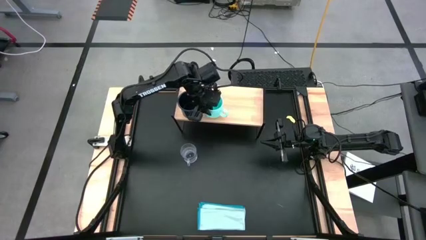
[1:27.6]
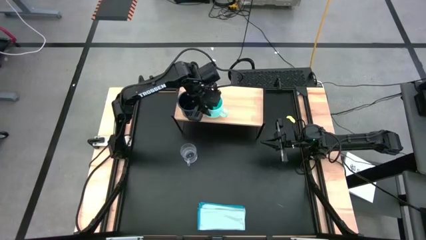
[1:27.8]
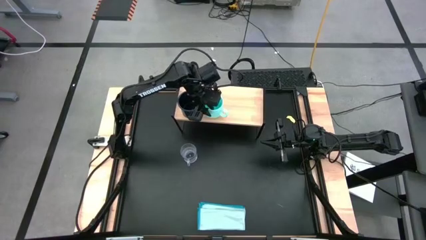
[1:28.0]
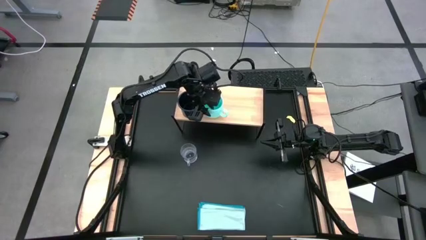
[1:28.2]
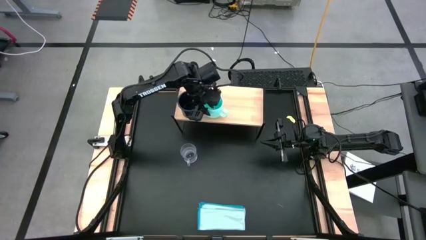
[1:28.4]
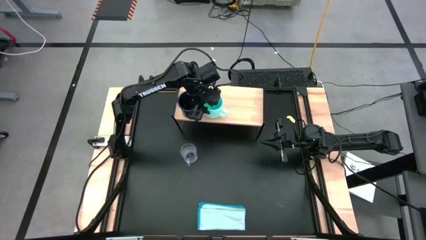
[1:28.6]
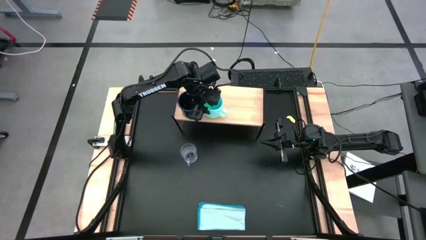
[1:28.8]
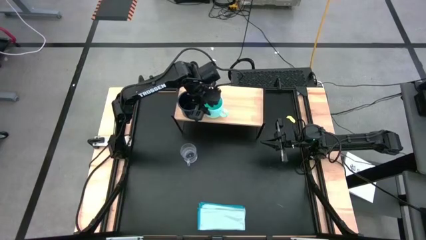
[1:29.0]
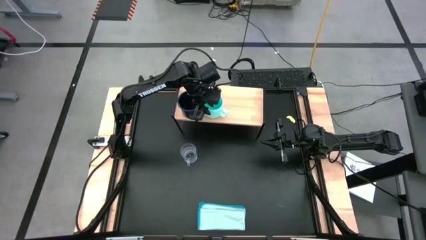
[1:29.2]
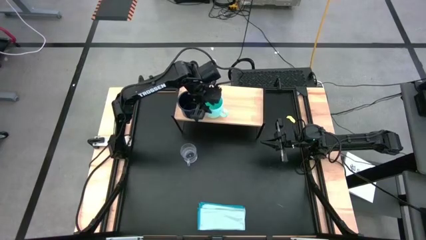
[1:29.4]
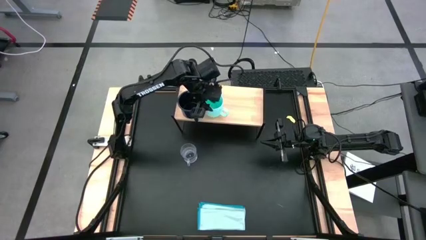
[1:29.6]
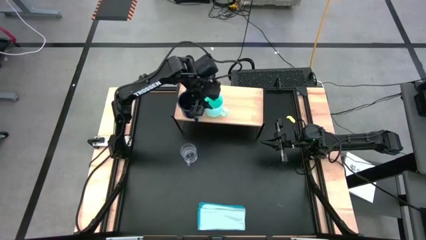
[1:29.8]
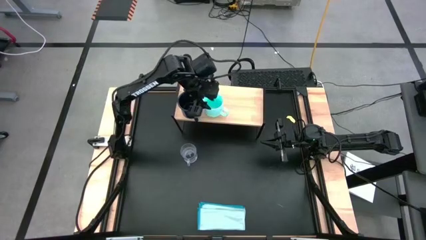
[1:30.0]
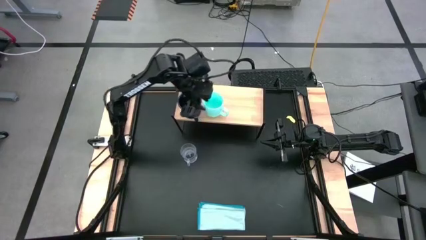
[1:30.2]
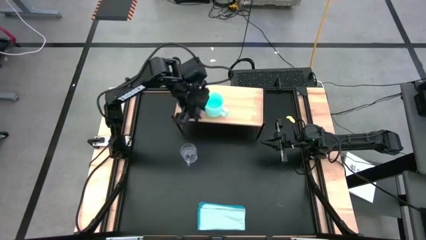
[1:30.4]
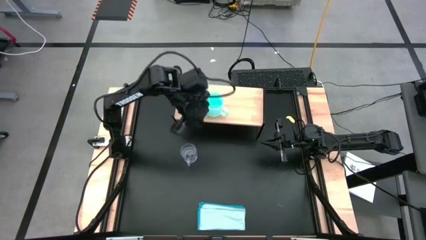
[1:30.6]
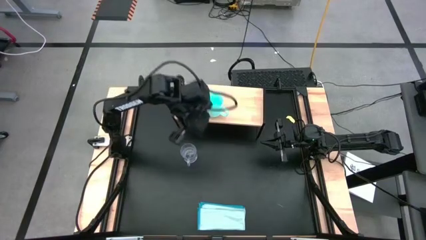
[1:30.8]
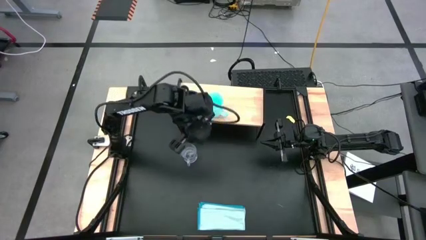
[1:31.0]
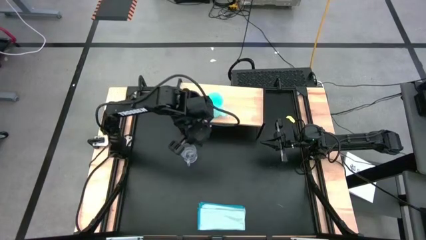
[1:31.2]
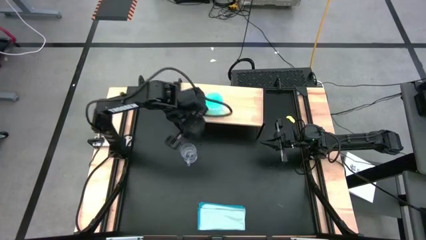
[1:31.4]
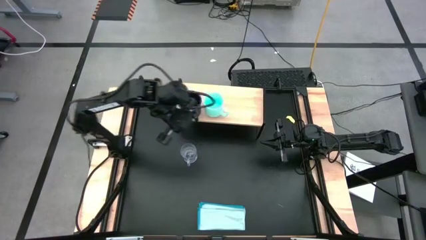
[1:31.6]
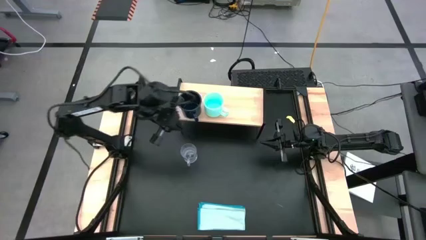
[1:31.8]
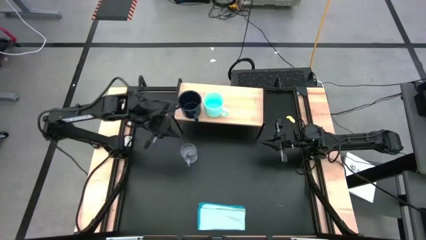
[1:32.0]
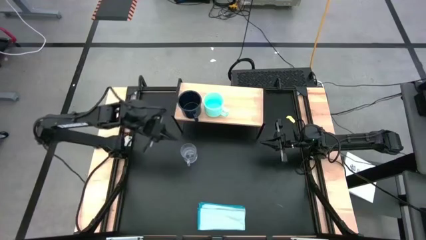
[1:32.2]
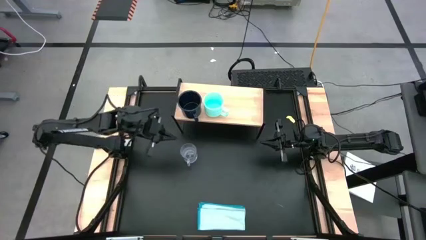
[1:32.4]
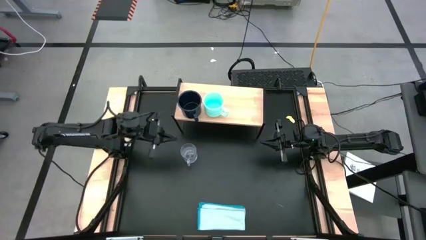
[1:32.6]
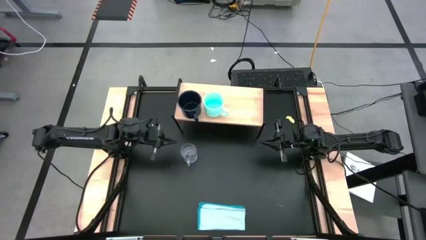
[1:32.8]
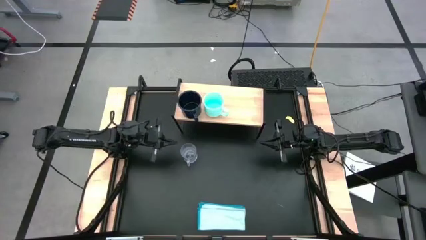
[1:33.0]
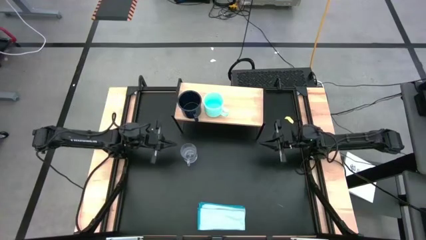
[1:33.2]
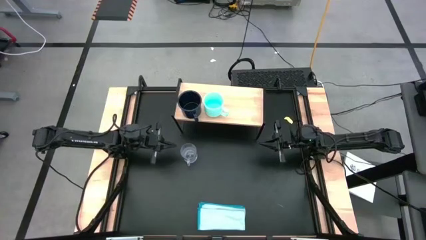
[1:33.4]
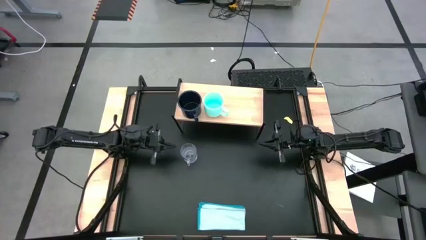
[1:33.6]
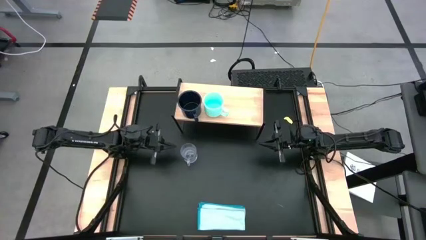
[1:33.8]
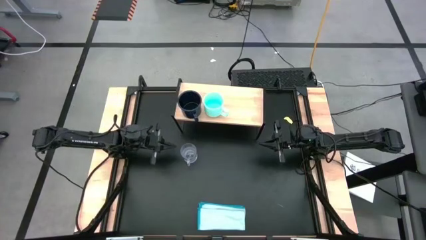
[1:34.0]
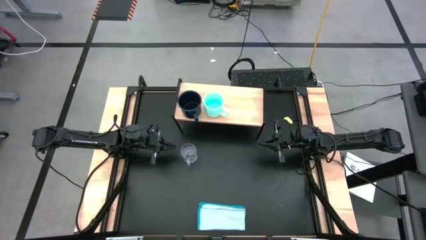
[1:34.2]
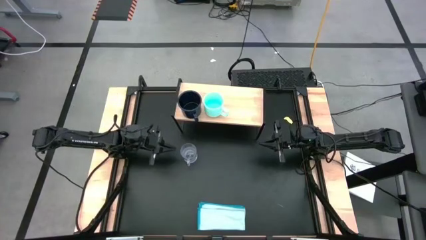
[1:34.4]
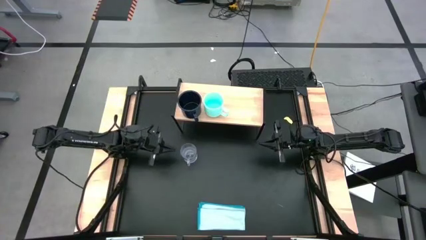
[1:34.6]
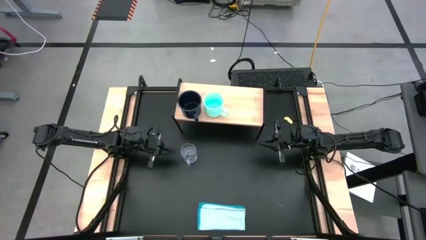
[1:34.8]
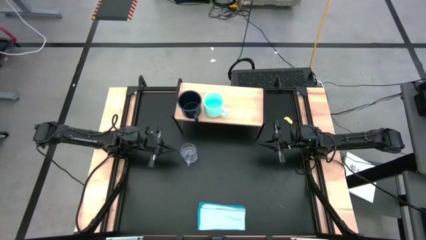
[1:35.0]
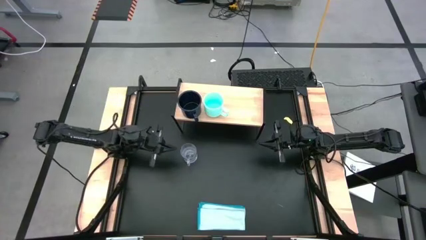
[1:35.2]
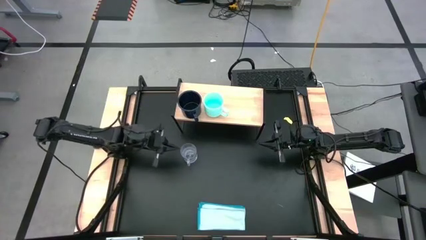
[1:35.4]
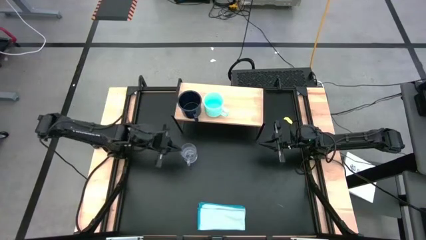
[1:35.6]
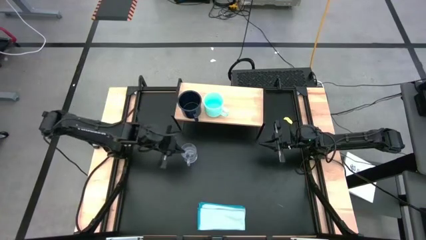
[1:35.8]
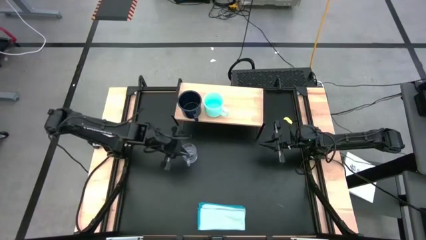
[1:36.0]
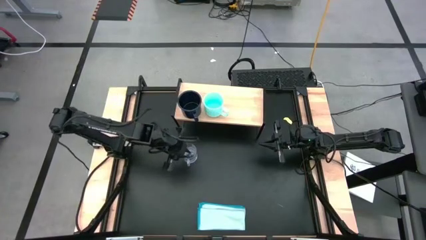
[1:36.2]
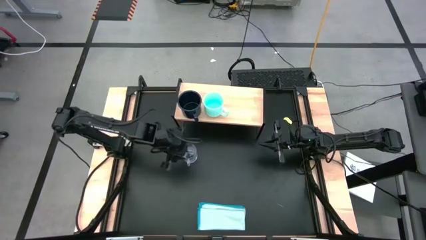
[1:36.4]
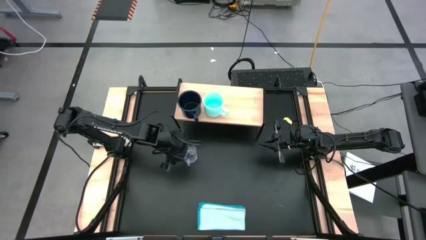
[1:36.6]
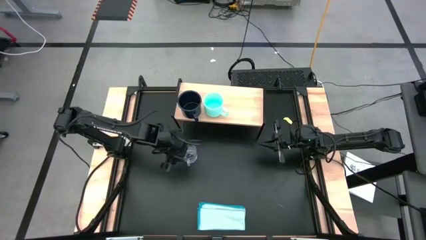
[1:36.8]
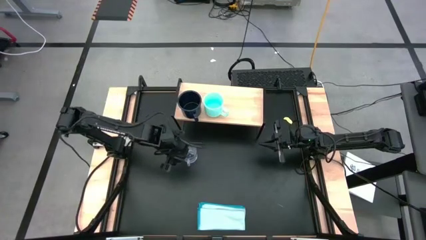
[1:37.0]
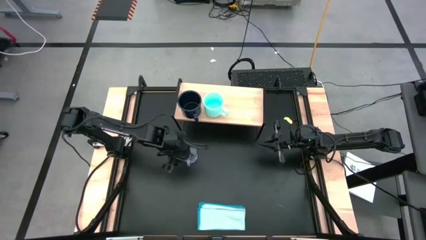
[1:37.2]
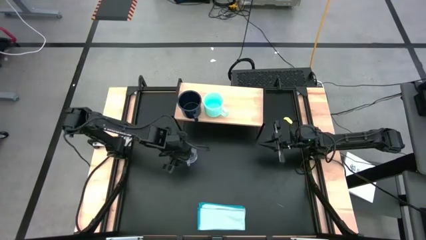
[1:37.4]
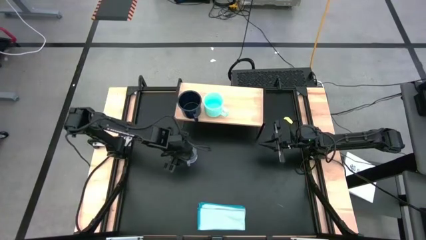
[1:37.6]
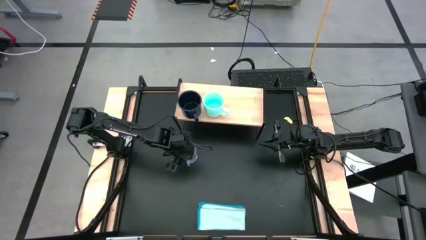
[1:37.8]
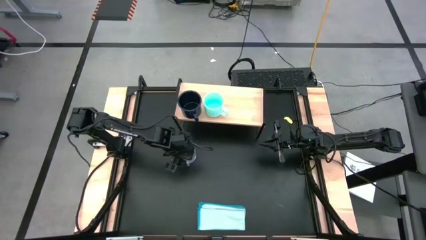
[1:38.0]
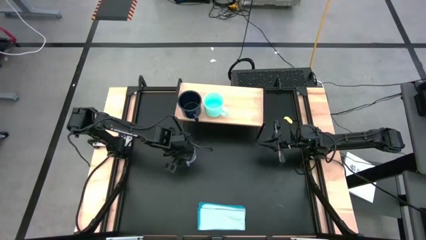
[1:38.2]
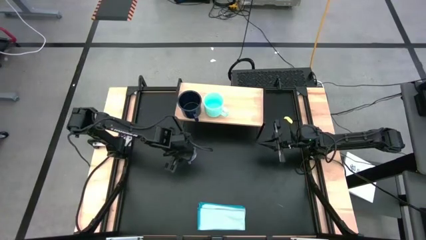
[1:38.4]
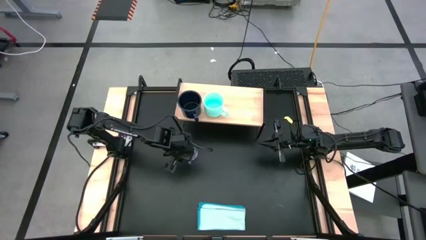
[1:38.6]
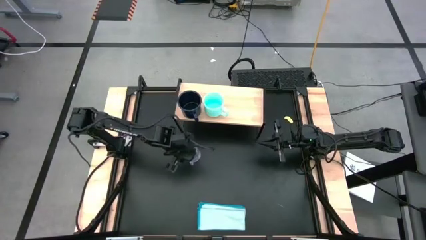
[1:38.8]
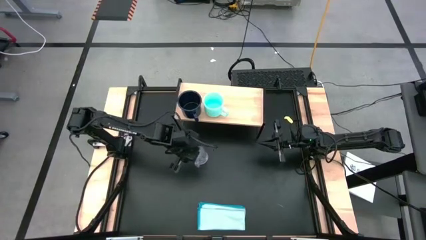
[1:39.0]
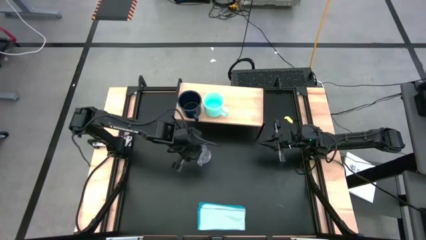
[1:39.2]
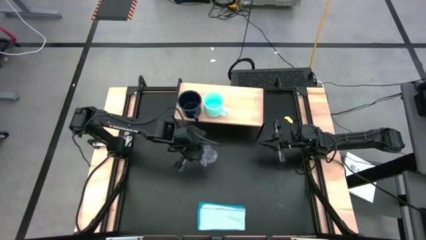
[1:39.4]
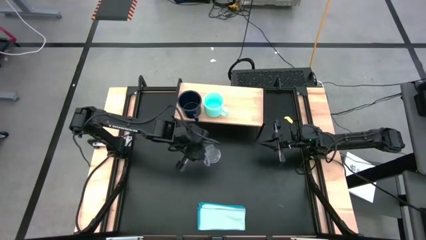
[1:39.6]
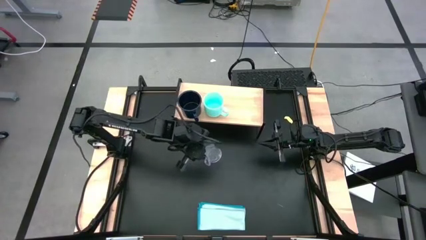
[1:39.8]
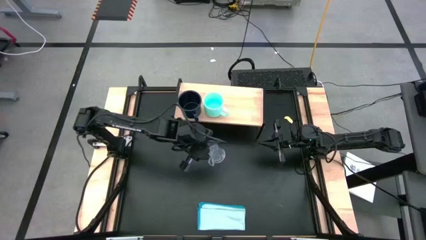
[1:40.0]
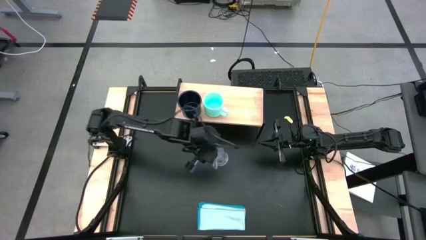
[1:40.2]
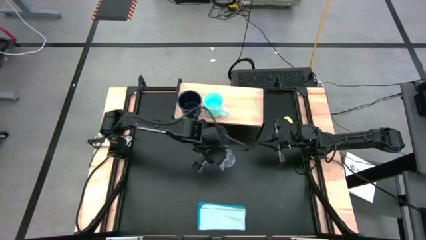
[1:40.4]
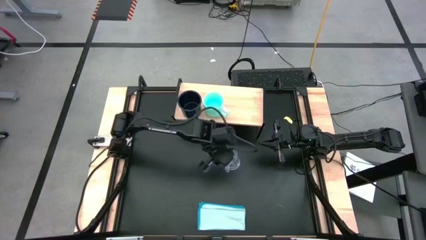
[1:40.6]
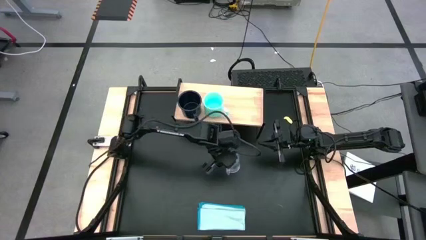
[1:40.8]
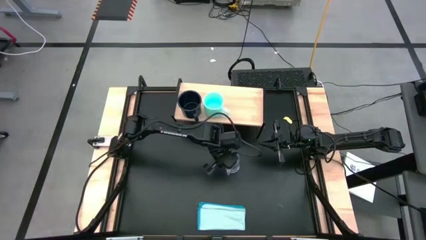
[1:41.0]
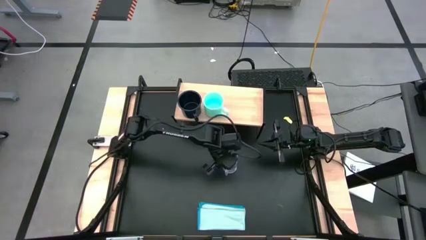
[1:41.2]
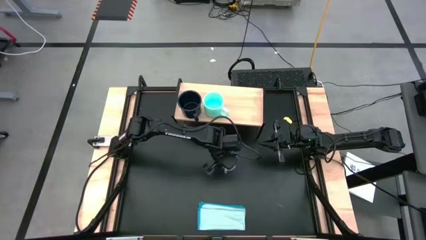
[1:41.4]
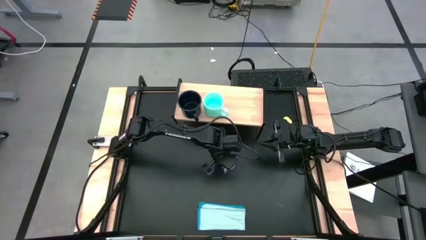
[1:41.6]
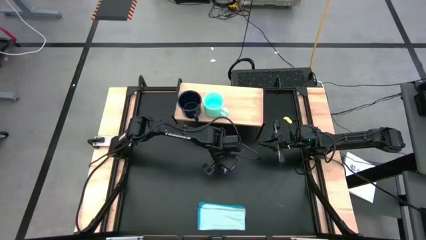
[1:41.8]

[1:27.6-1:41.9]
Task: Stack small to large cups/mugs on shelf
Put the transparent mug on the shelf
